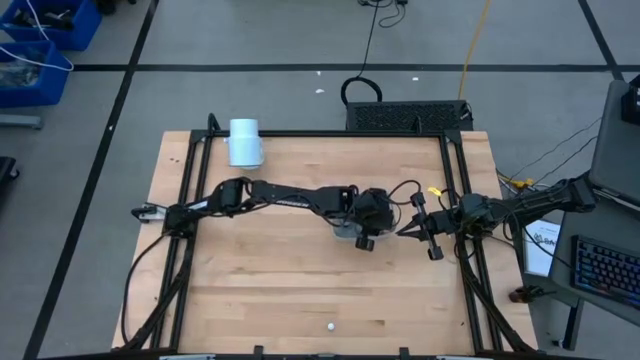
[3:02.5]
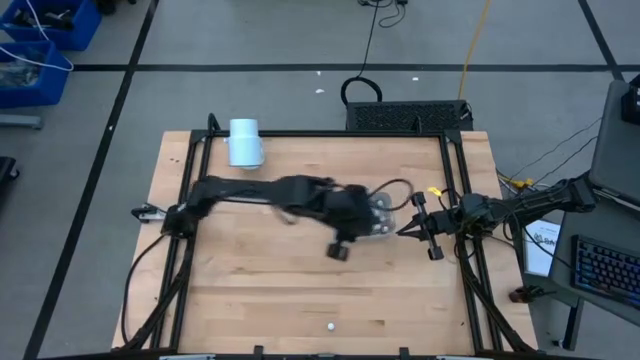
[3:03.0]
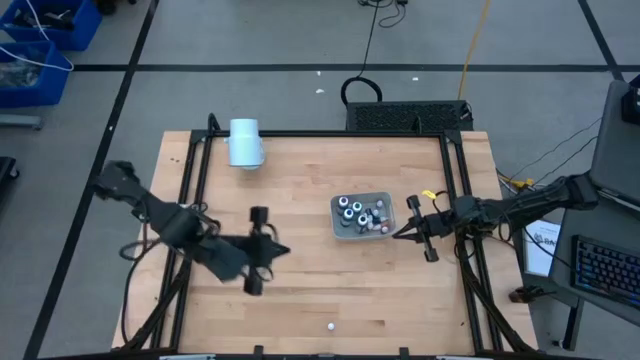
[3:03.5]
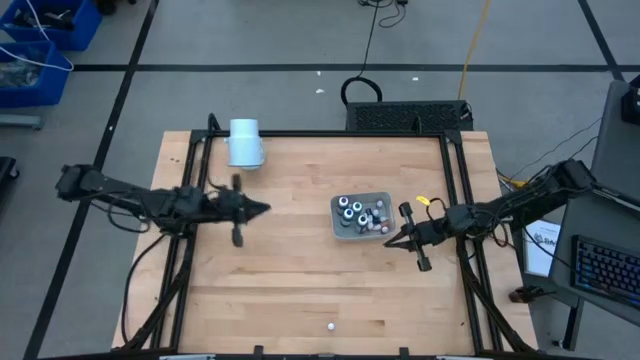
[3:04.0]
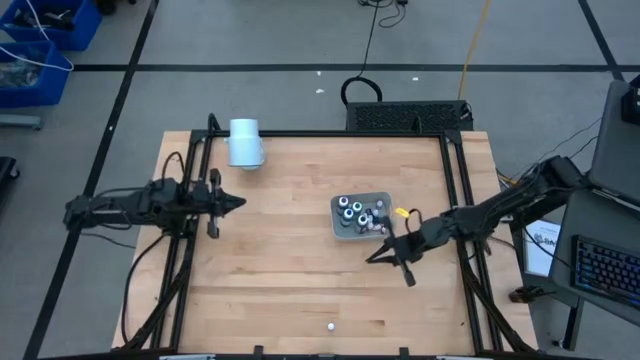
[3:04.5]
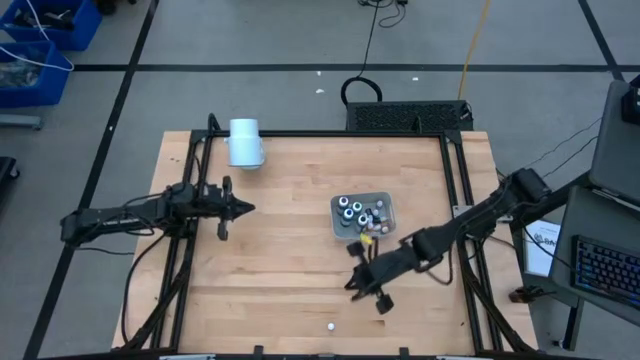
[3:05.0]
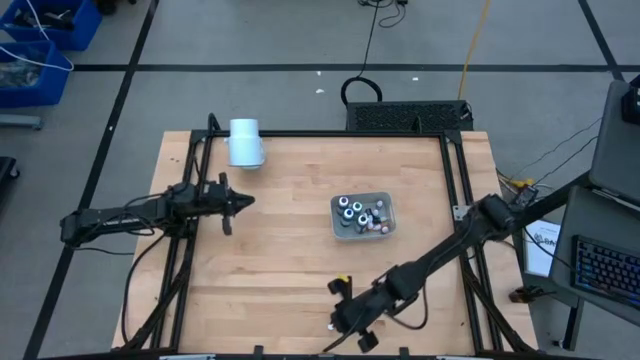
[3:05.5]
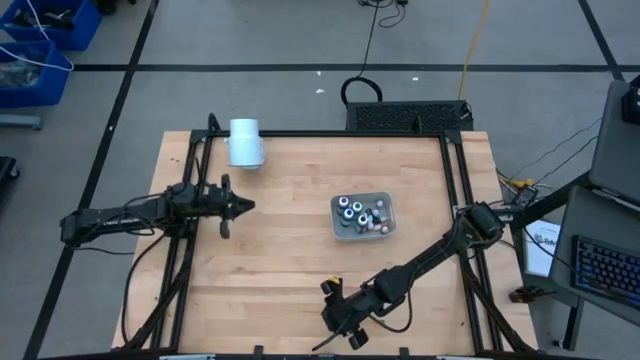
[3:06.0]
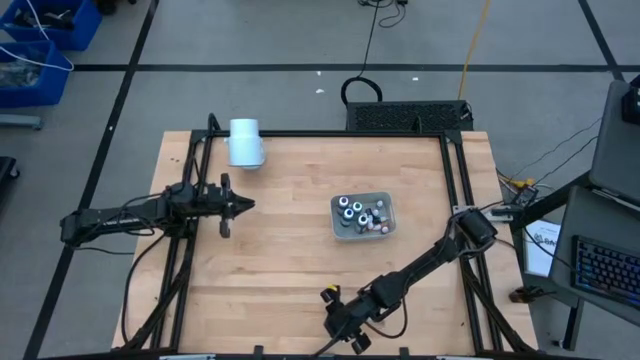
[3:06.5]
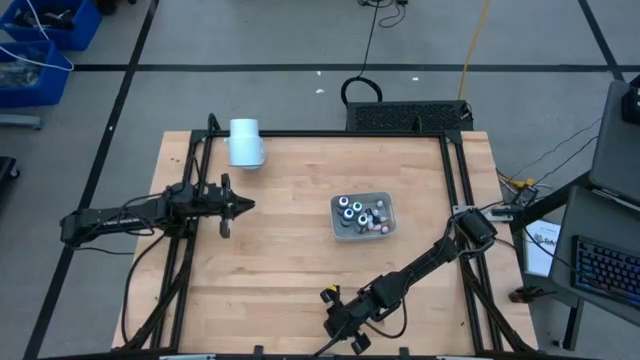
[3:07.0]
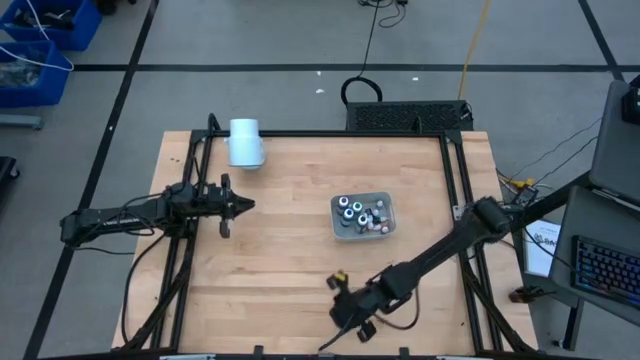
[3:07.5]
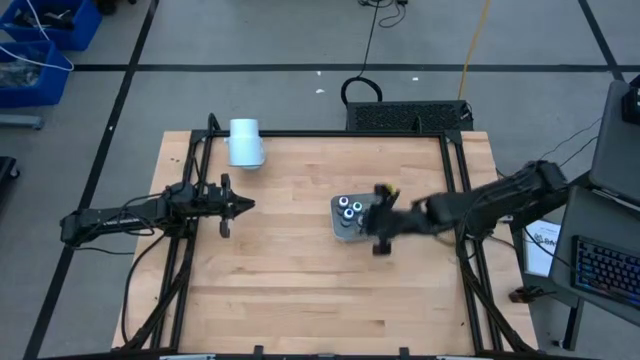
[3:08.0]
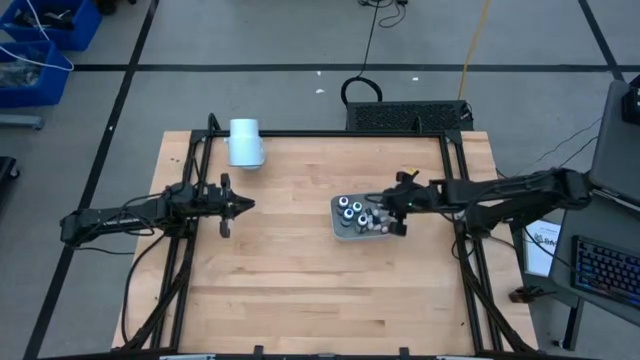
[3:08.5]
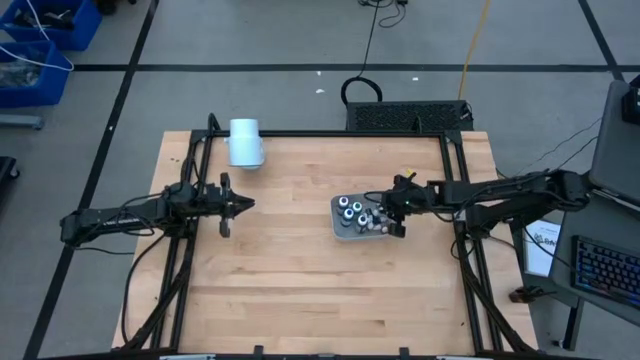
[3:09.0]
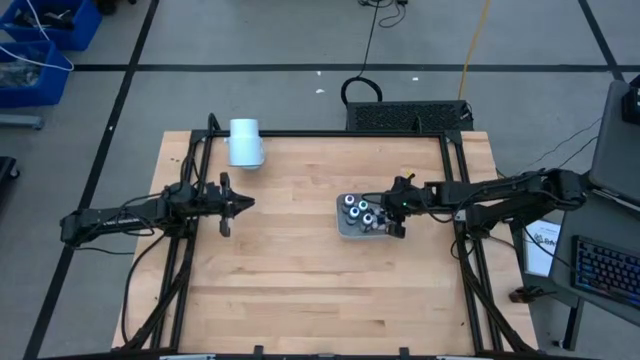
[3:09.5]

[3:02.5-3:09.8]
Task: Pick & Place food coloring
Put the small yellow food coloring bottle into the gray bin

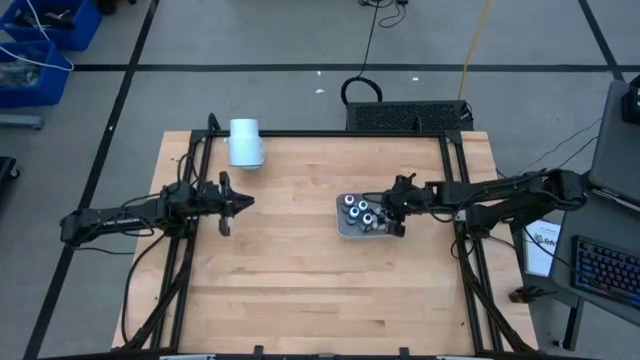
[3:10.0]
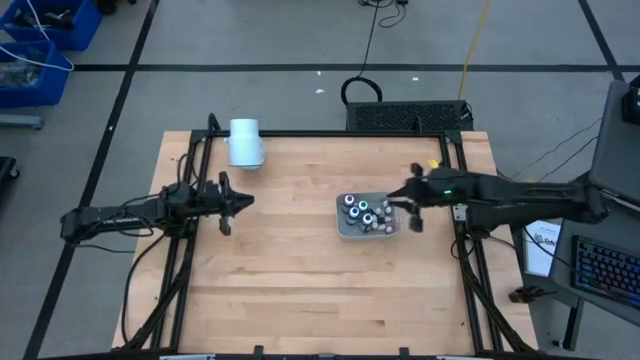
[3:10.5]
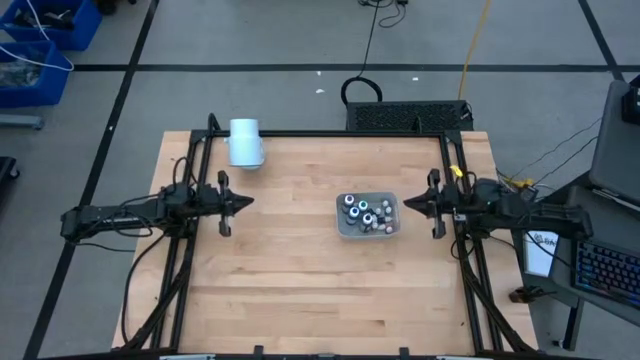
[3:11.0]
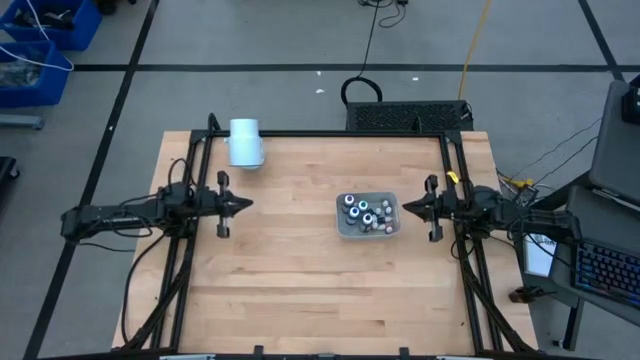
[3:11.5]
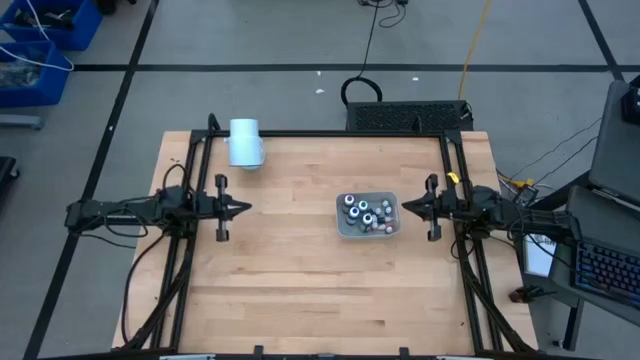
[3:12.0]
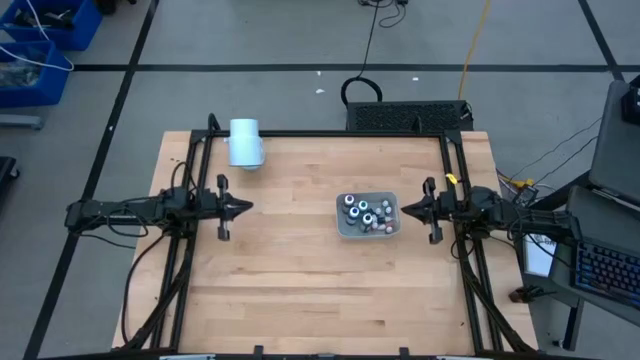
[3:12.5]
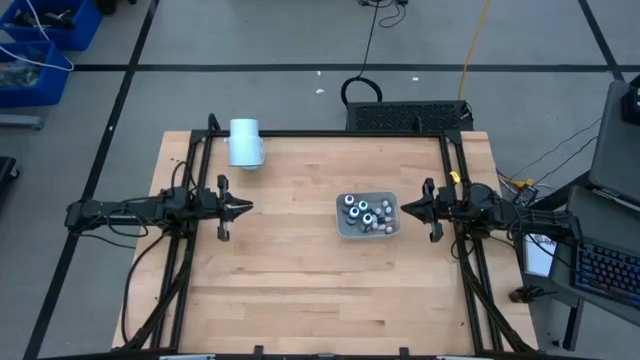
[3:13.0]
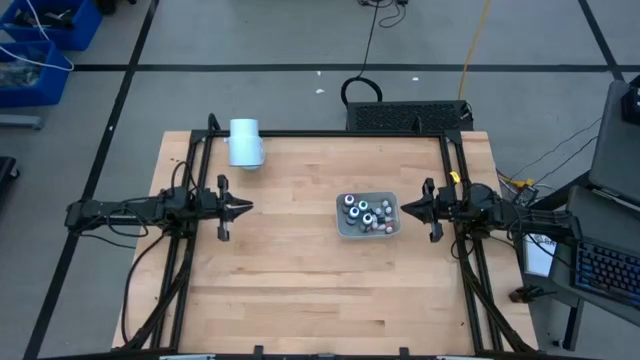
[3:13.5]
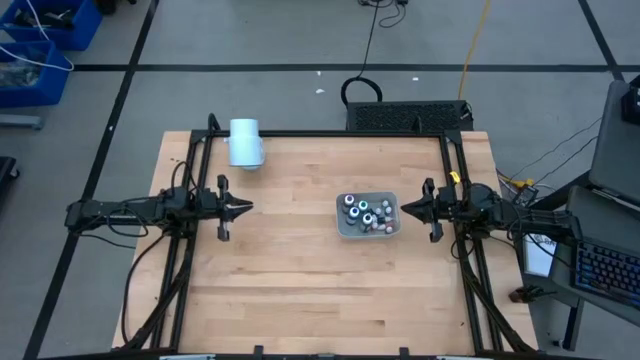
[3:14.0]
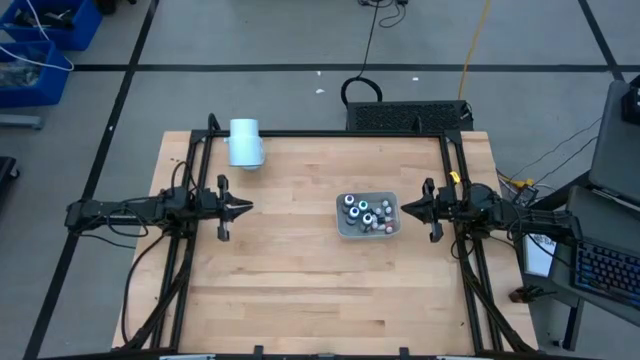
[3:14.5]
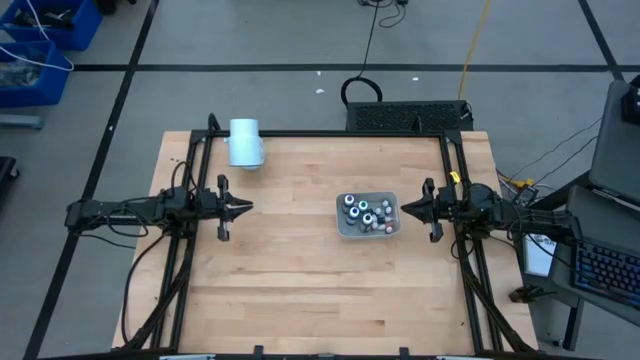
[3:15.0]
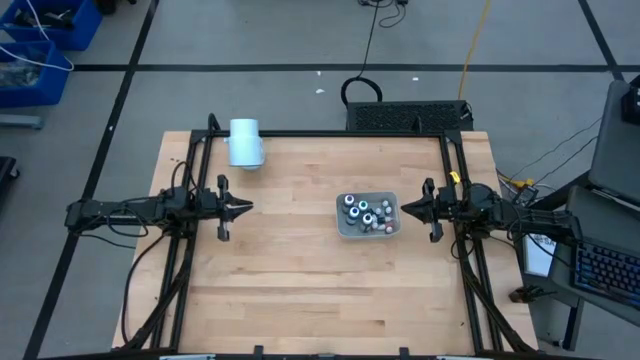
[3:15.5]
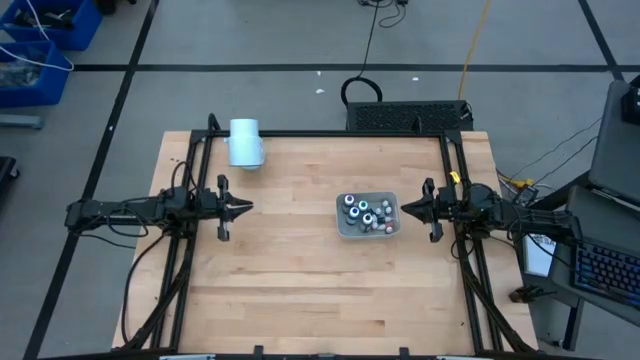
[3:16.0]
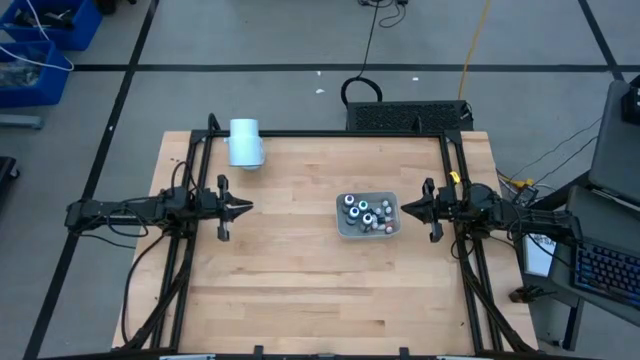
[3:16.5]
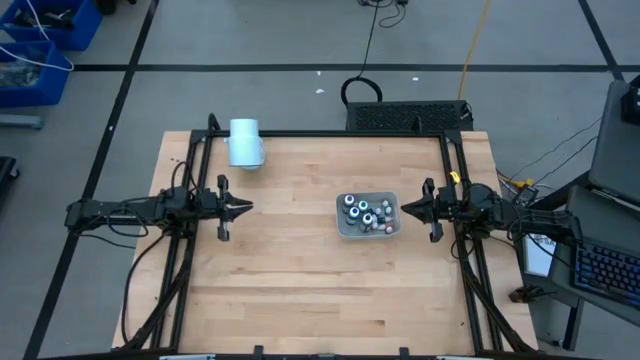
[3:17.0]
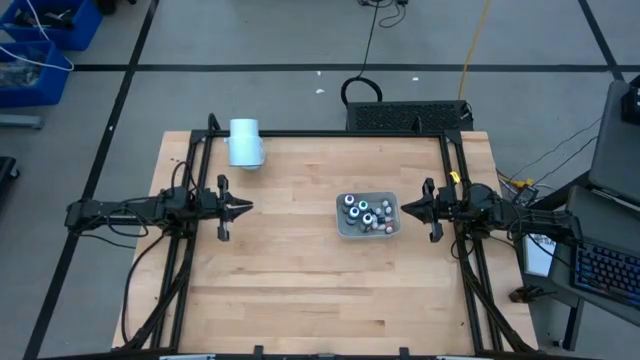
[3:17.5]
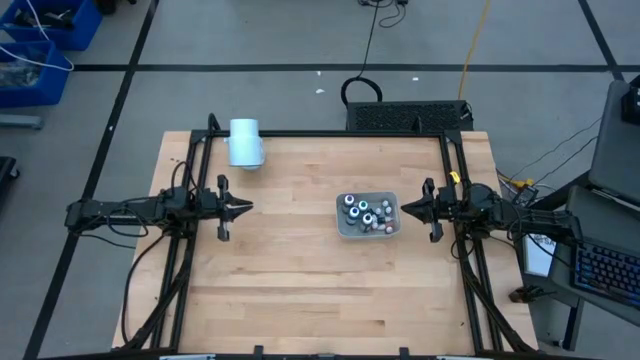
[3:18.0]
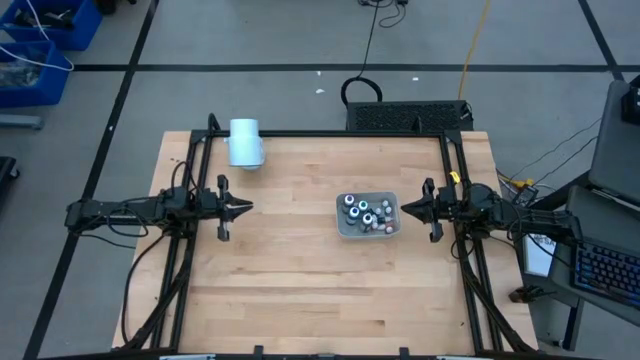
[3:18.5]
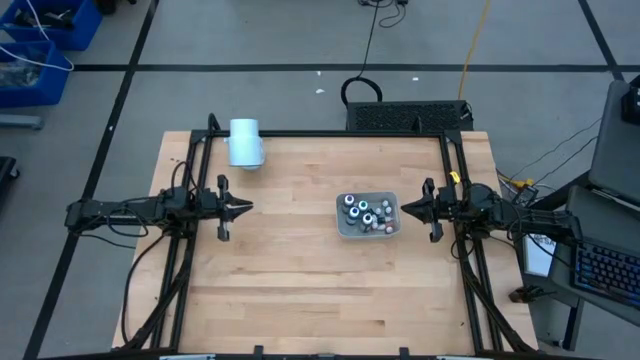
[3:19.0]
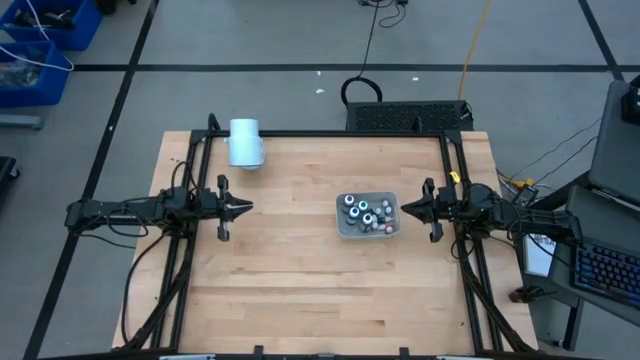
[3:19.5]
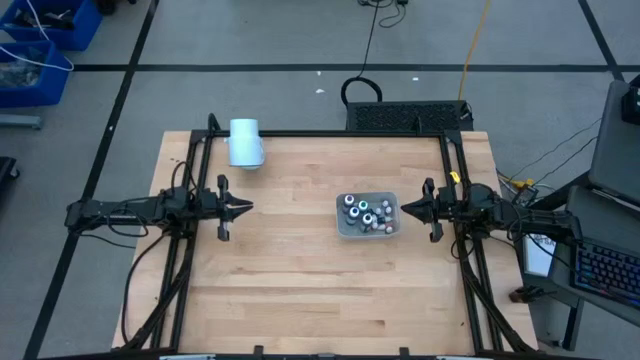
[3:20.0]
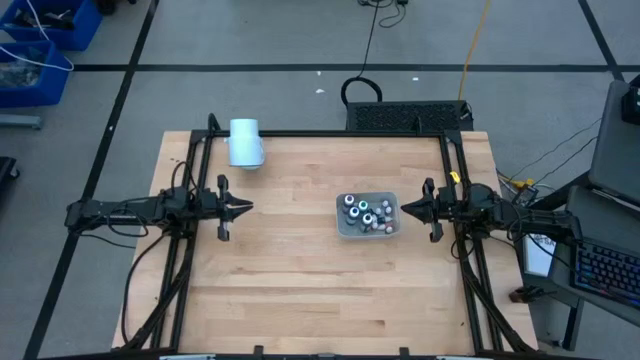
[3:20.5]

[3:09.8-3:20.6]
Return to Home Position
